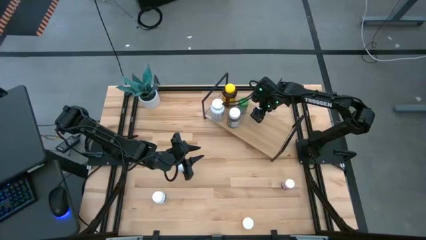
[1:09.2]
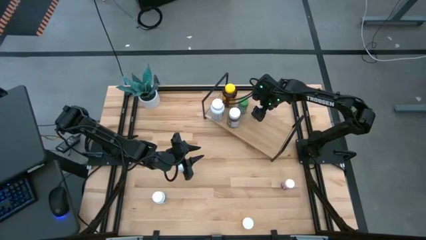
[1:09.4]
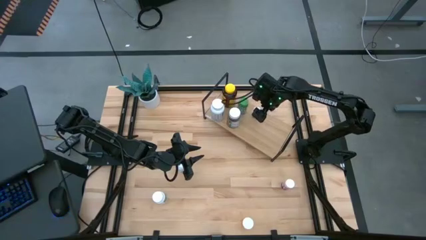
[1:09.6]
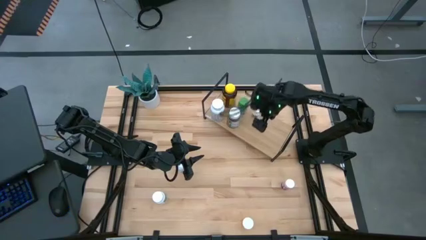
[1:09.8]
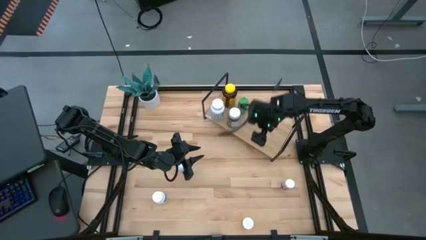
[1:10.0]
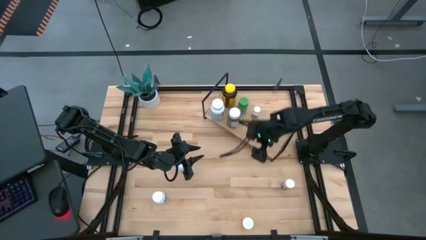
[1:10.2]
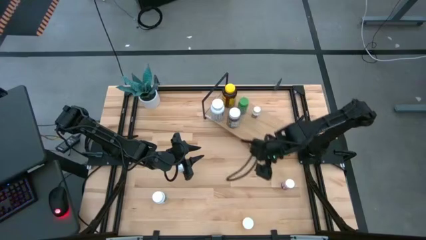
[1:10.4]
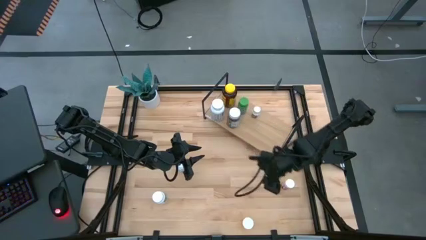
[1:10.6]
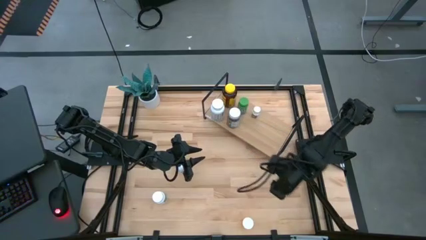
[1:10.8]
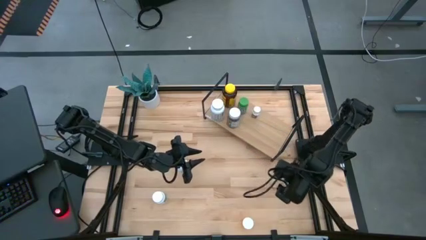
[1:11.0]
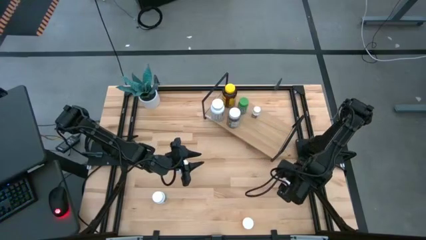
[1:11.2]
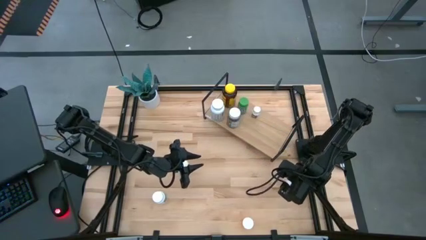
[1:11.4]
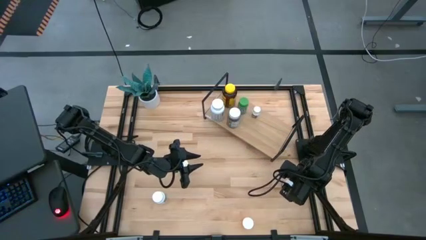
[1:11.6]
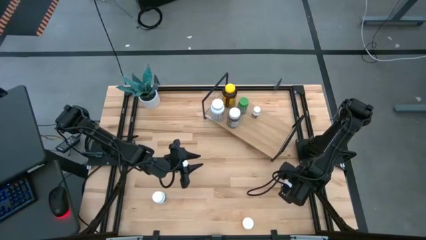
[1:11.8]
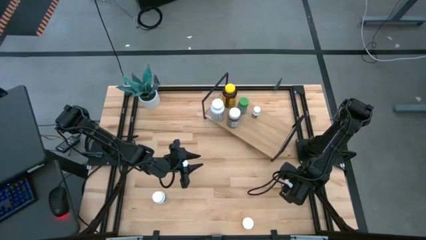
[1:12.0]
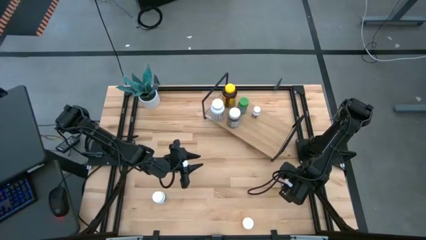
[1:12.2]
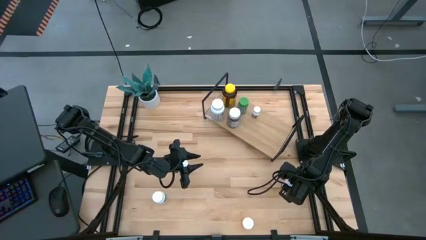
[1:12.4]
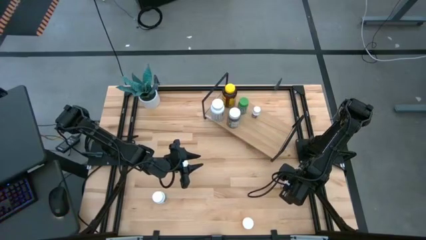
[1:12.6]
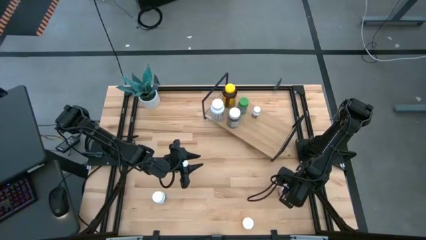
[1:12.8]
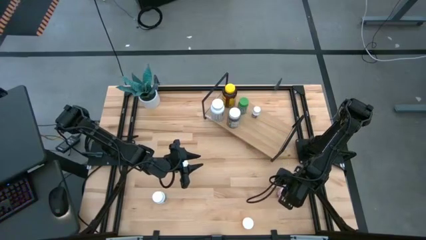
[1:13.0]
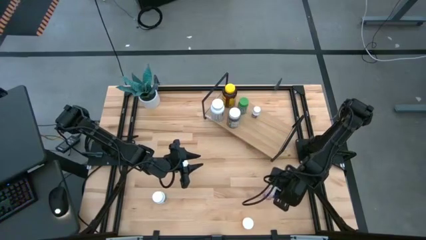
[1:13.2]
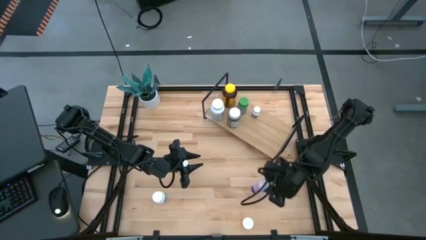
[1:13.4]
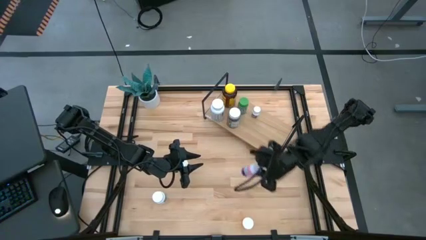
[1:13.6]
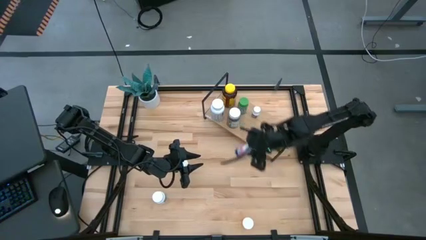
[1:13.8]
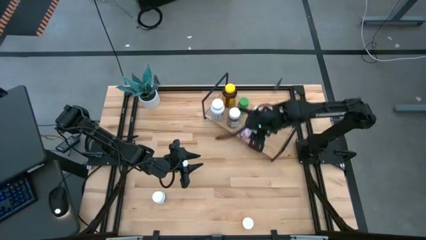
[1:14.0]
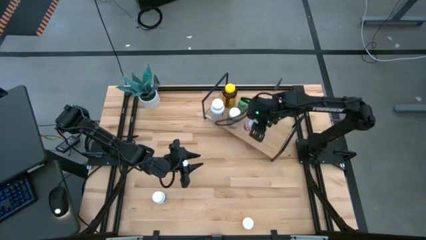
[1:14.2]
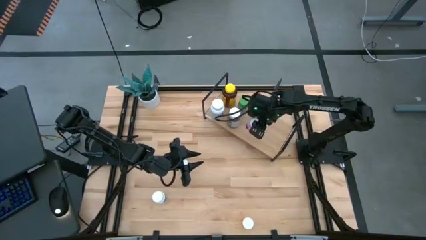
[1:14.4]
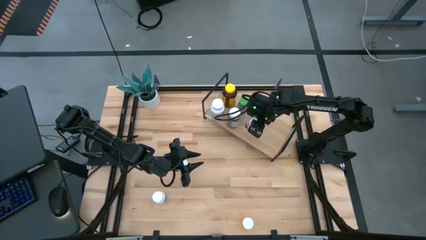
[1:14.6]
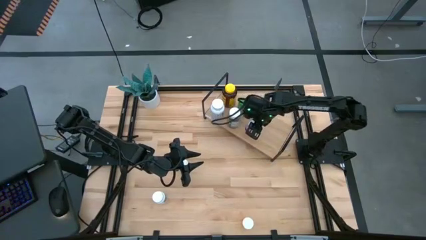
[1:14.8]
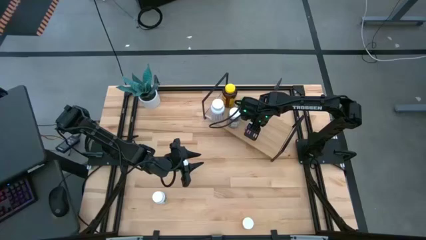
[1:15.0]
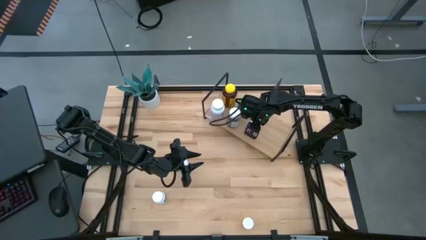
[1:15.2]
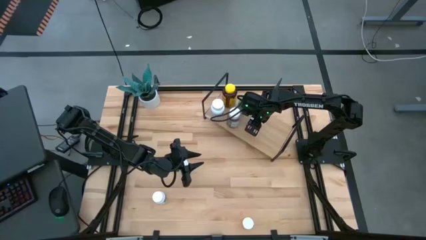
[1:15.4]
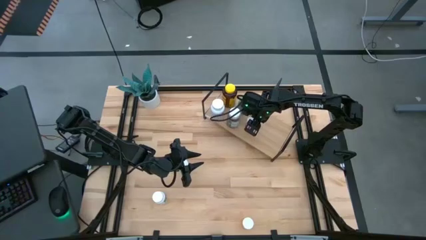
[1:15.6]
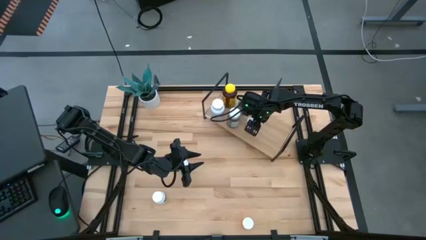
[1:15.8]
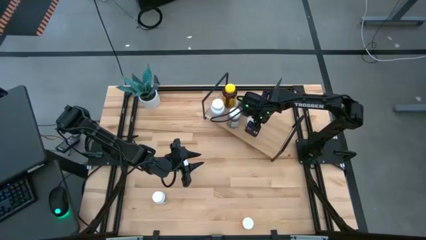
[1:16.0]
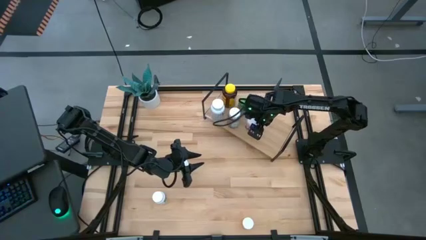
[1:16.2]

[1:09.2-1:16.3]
Task: Pick and place medicine bottles onto shelf by color
Put the pink pill bottle on the shelf

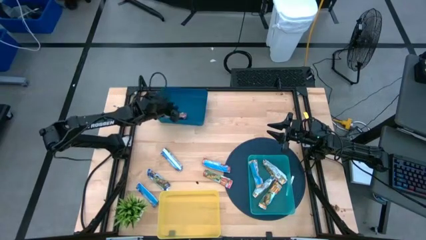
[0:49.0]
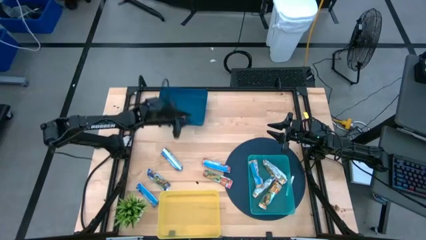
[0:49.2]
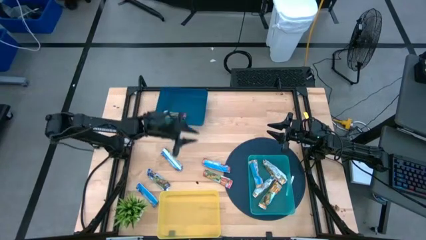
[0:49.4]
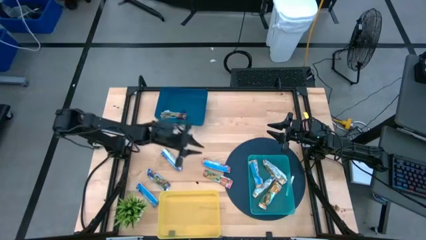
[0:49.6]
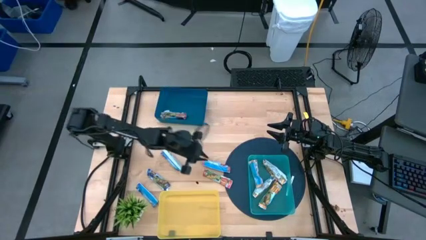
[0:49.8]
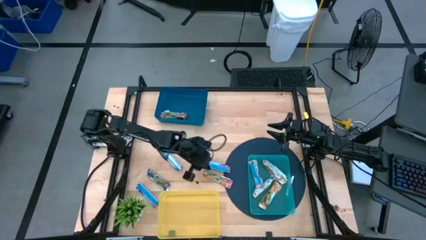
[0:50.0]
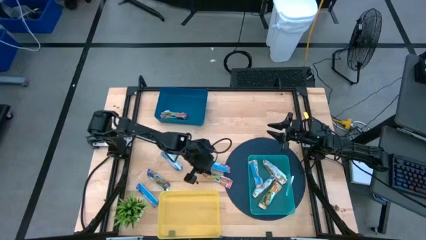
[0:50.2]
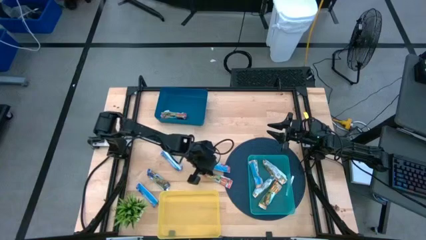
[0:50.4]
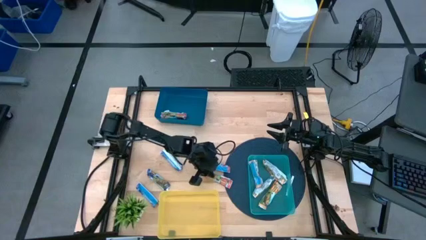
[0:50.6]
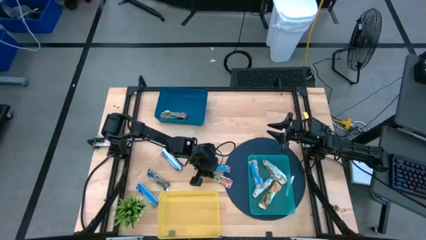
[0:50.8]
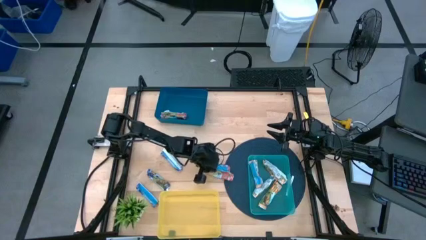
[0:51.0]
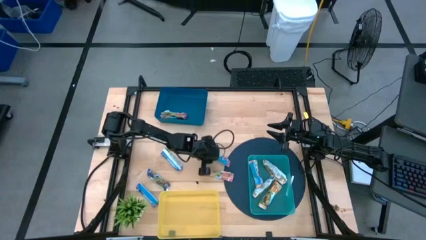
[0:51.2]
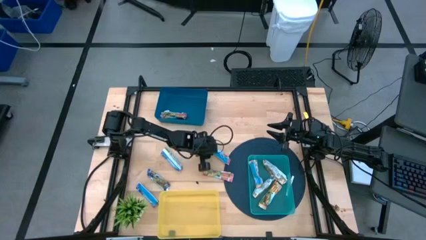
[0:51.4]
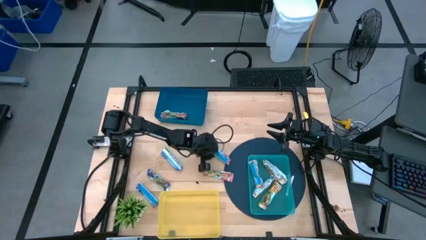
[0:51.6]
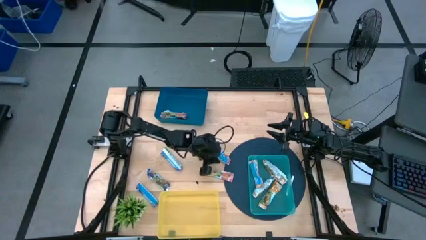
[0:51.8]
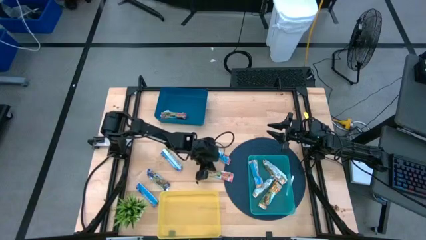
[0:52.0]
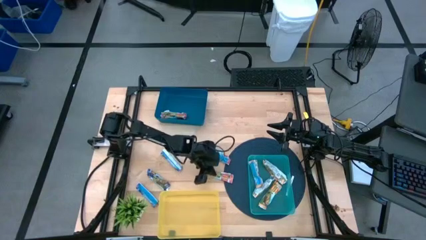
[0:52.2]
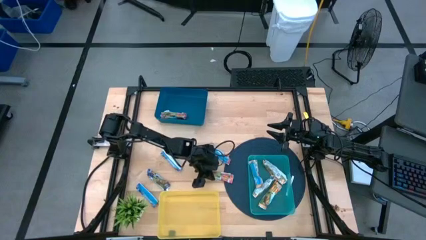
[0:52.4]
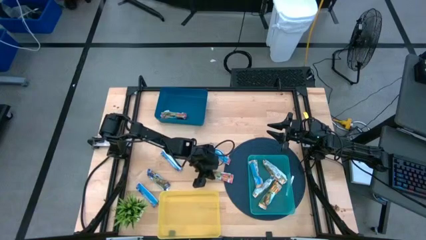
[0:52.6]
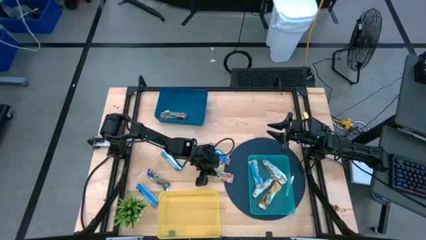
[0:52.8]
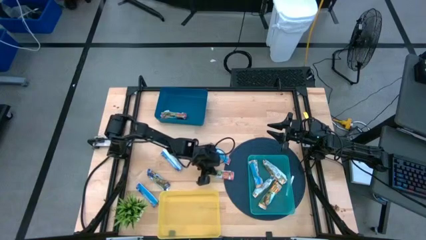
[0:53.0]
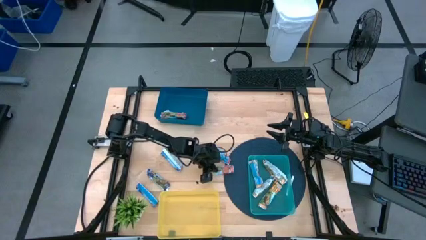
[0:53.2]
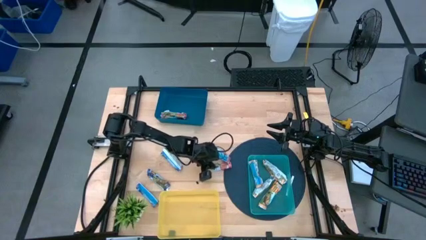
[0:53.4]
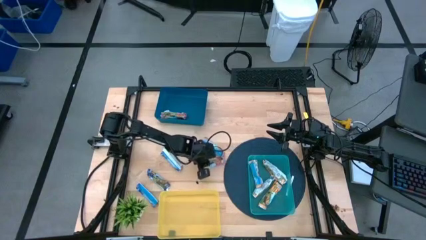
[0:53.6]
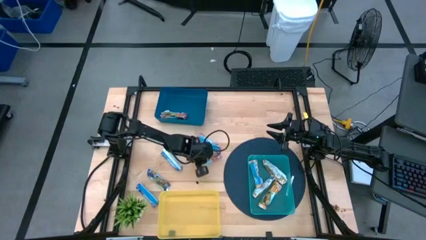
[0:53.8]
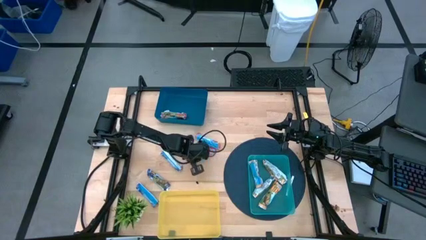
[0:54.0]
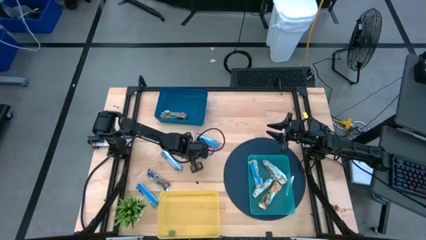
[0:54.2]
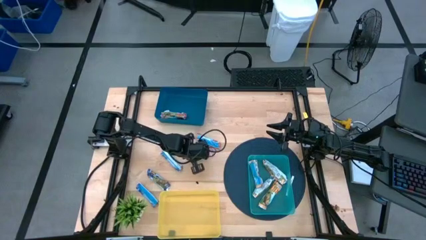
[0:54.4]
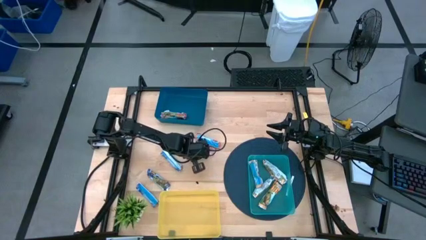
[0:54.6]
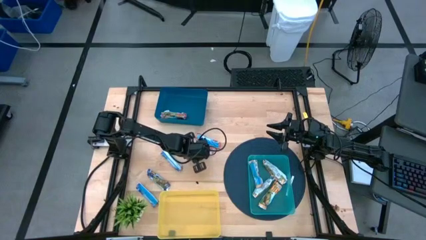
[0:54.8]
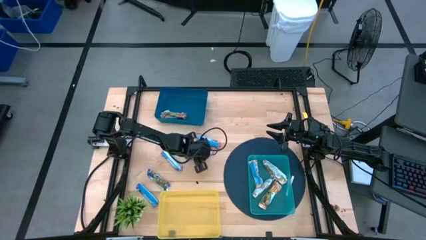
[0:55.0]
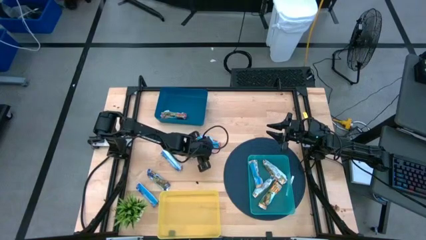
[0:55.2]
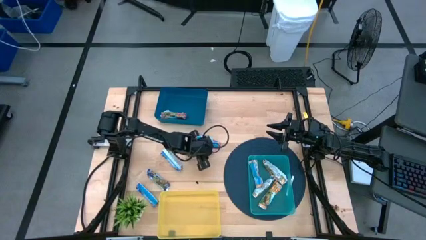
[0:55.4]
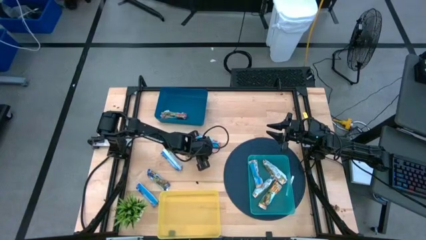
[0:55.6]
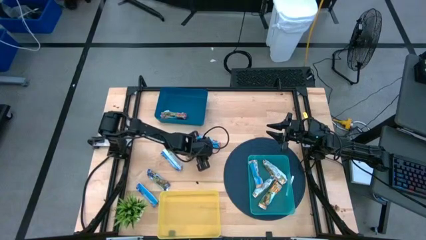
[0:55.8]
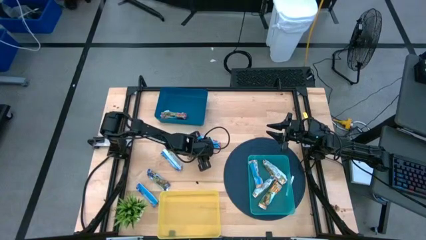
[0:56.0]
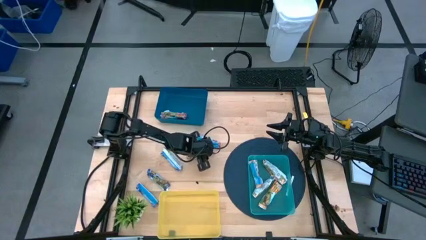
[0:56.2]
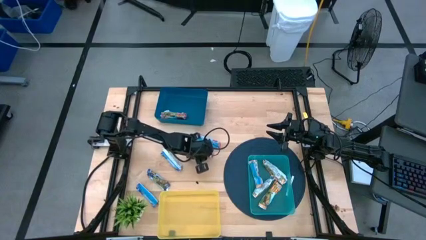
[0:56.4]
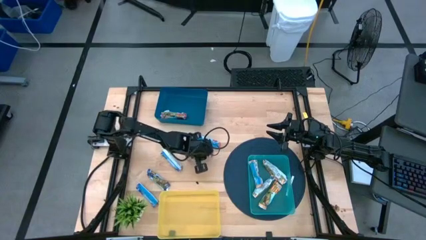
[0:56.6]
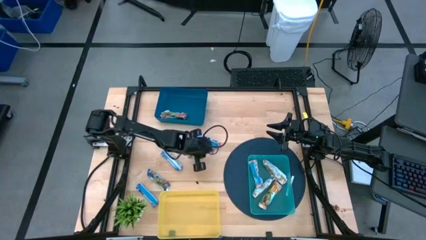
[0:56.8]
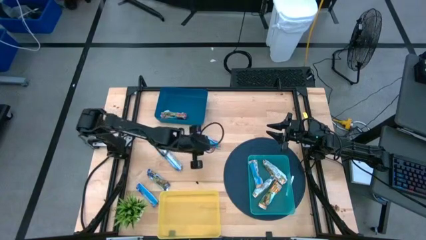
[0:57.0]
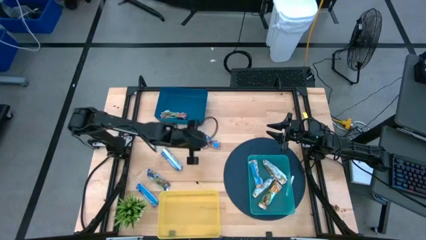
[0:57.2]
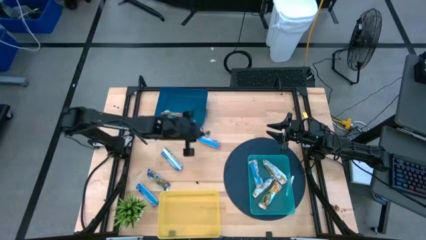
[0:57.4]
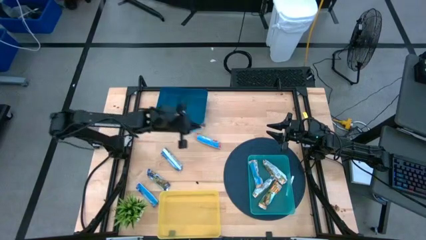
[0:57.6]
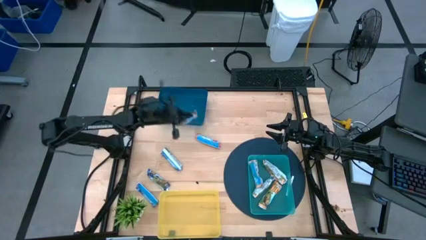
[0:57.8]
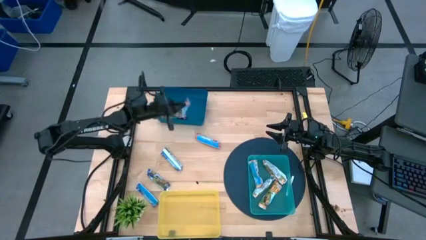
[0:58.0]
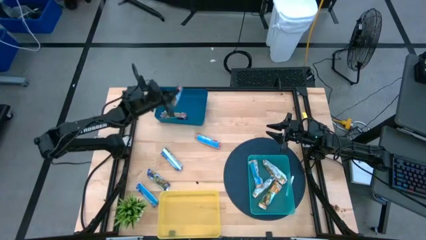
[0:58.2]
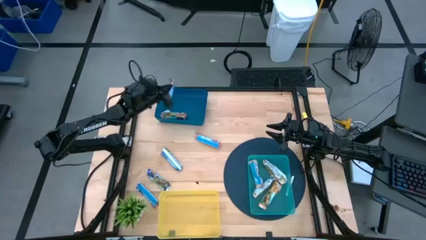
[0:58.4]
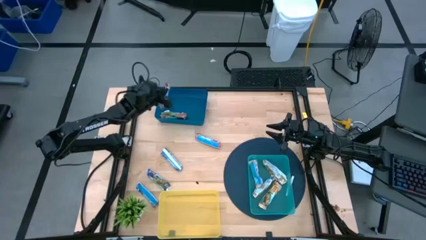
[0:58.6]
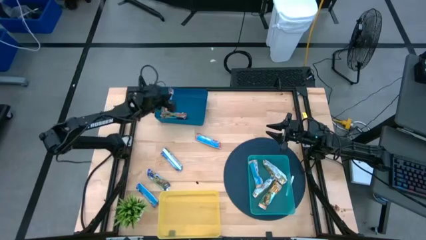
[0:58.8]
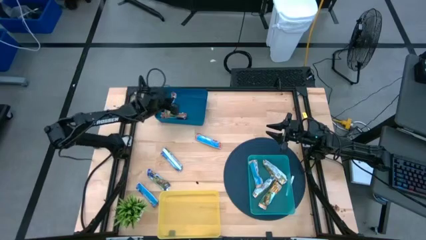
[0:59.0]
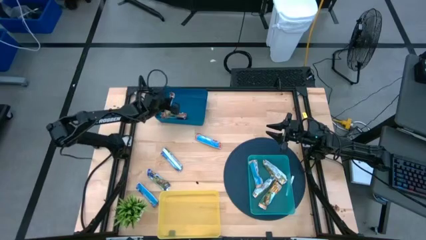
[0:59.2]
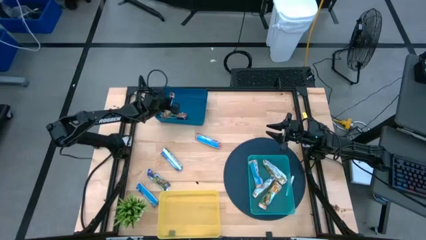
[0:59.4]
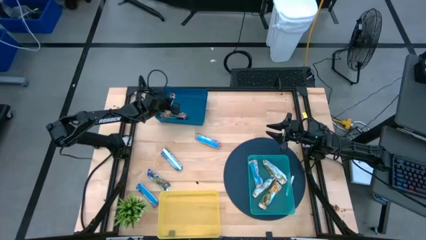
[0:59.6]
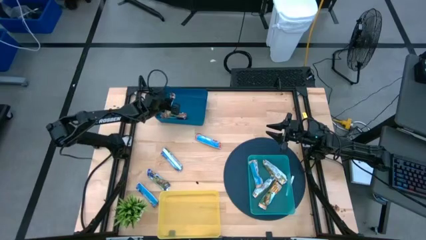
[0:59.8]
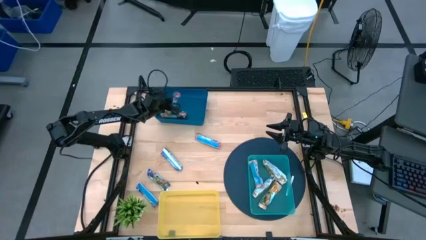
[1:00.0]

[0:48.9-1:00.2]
Task: Pick and place Granola Bars by type
Put the bottom red granola bar into the blue bin
